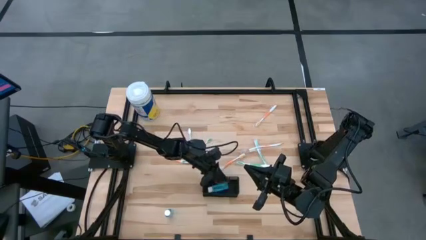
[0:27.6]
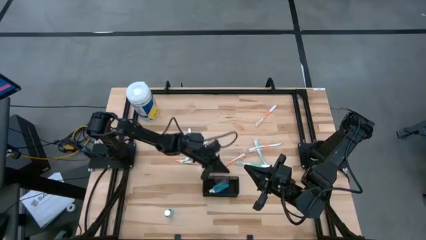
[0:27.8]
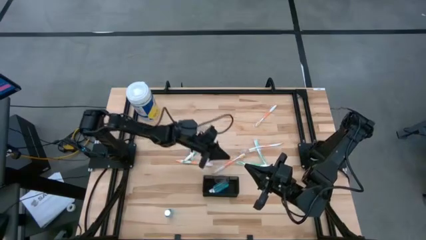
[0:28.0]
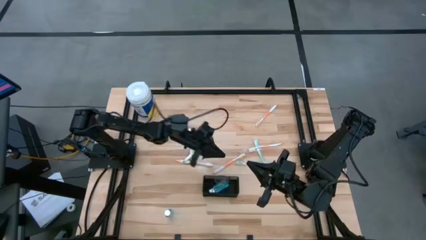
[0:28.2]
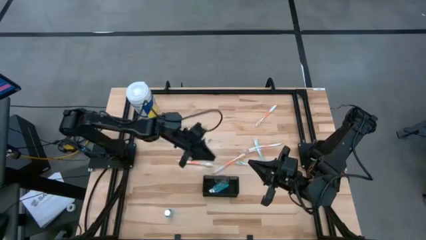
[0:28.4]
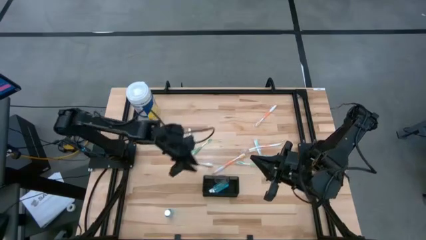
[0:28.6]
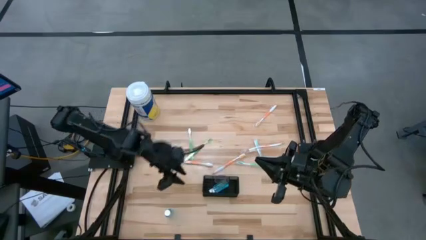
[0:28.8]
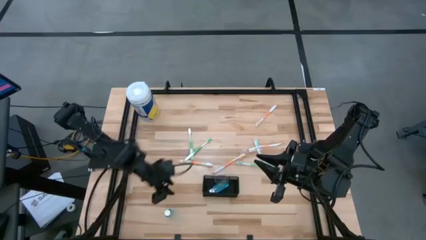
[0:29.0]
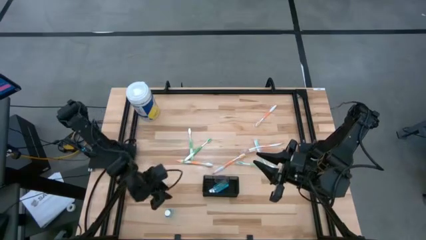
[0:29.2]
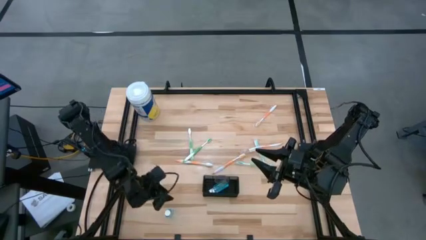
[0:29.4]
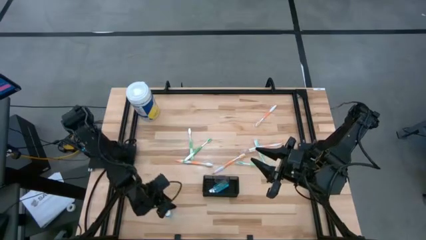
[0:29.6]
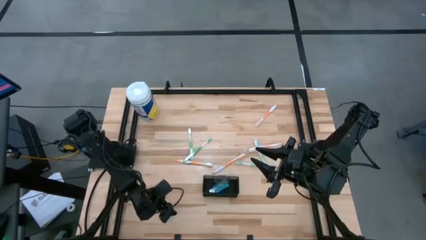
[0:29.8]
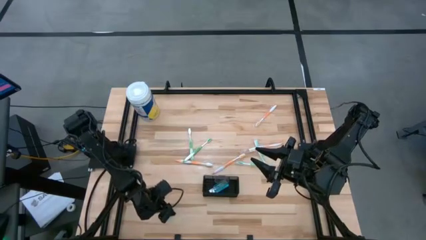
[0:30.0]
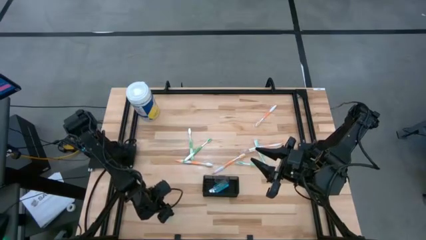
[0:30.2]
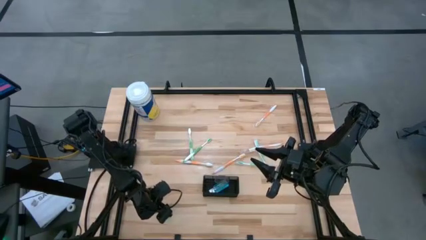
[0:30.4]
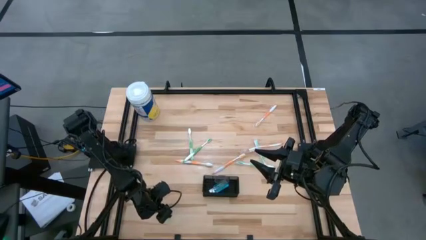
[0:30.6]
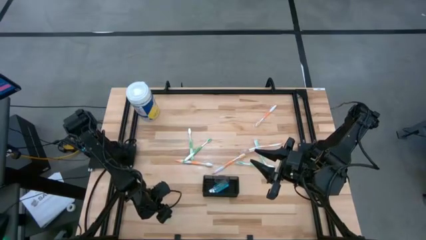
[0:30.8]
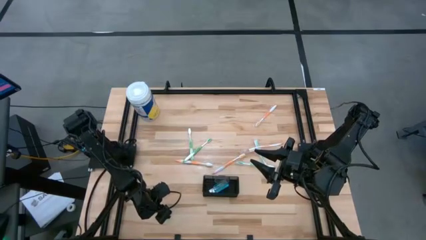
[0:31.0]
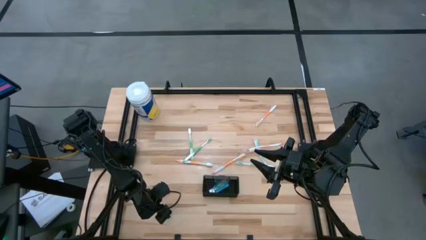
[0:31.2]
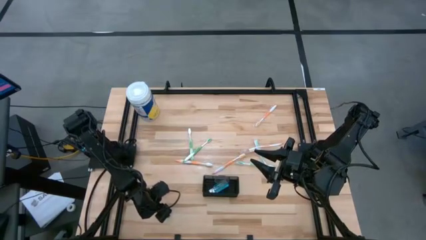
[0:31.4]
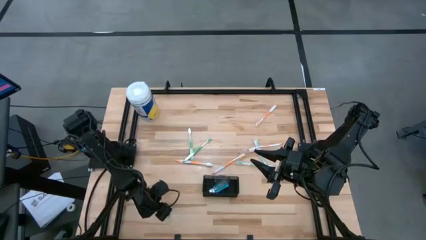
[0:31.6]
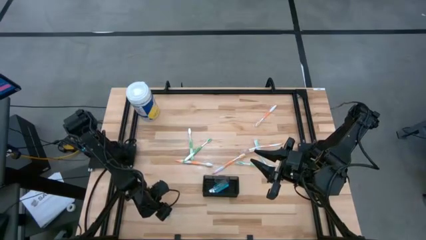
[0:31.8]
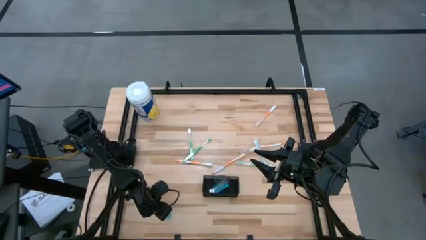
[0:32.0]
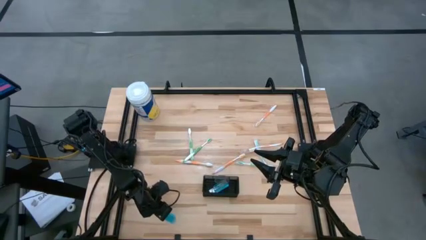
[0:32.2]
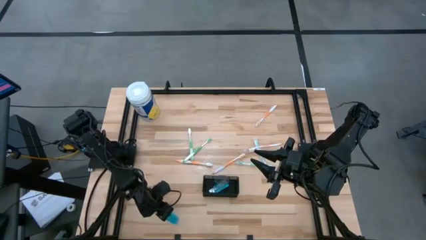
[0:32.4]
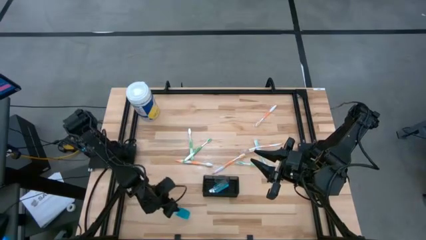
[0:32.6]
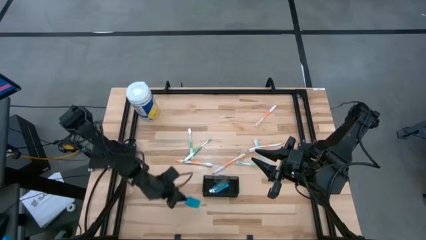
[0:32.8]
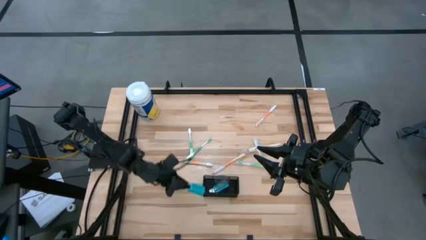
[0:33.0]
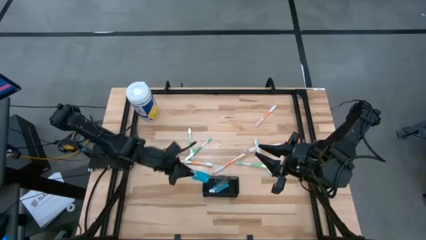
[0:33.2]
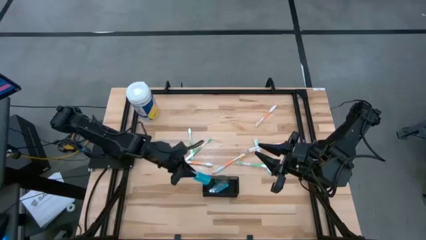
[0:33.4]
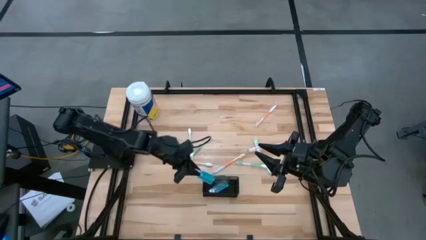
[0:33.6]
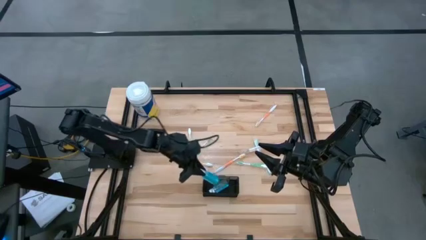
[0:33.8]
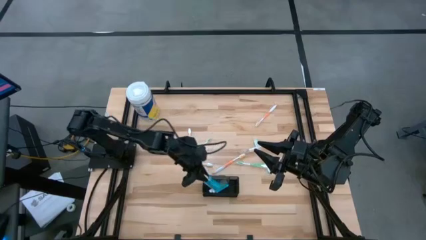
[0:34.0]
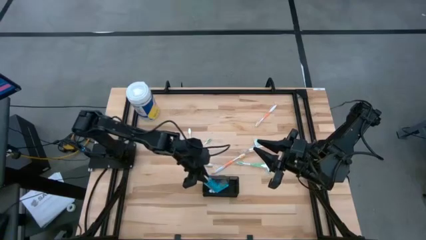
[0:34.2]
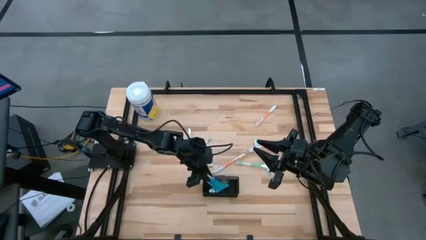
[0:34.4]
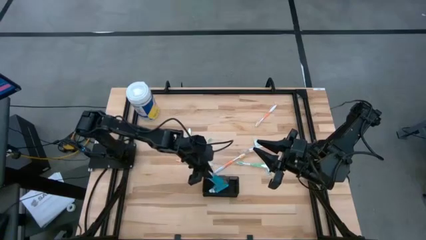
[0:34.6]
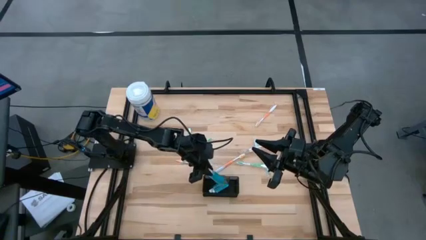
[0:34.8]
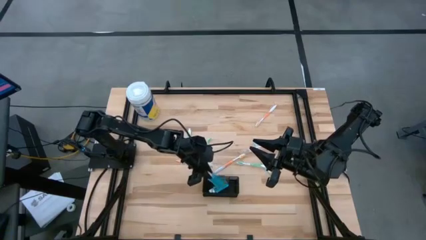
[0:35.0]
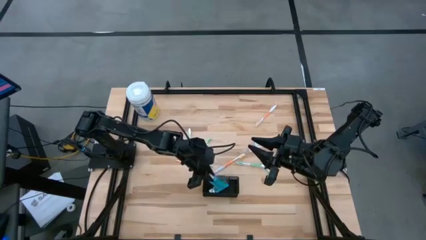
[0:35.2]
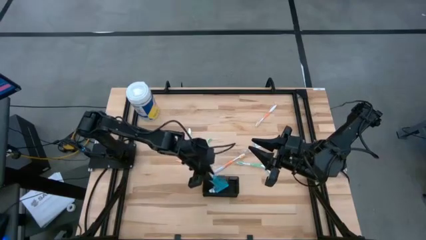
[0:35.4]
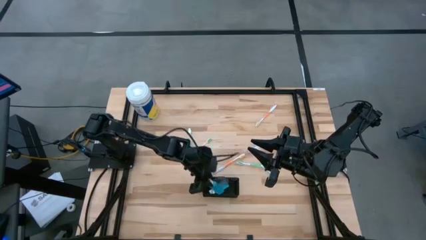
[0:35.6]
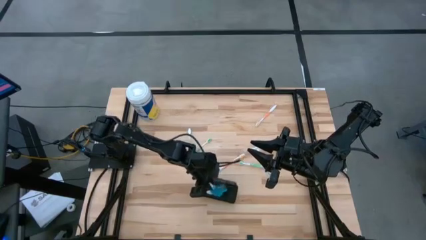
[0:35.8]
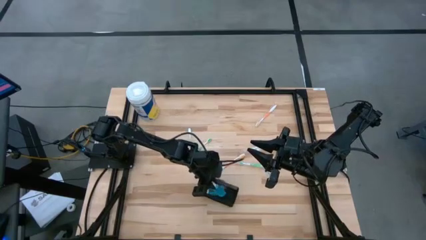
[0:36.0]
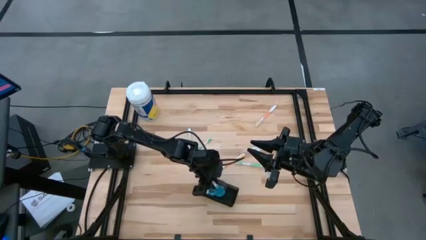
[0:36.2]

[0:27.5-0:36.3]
Task: Pick & Place toothbrushing station
Put the blue mouthwash into the black wire organizer

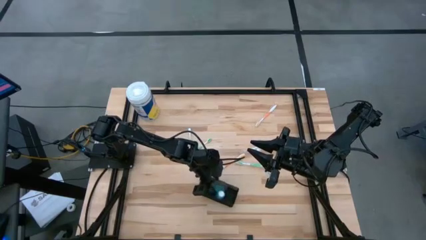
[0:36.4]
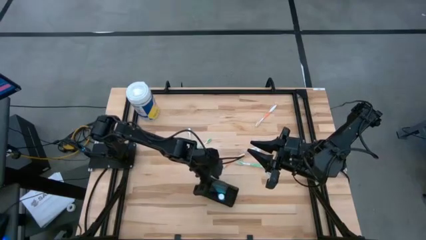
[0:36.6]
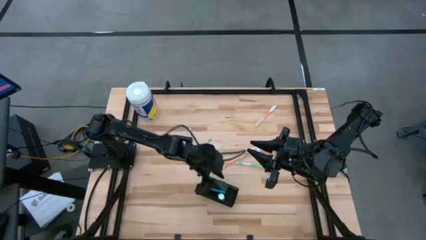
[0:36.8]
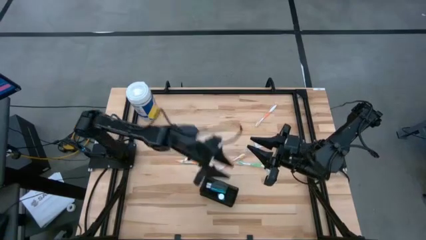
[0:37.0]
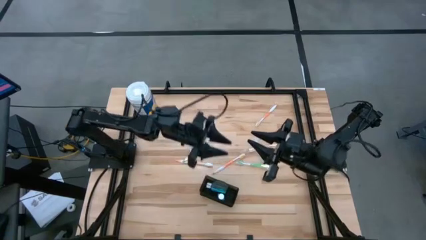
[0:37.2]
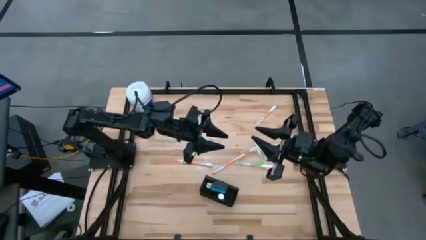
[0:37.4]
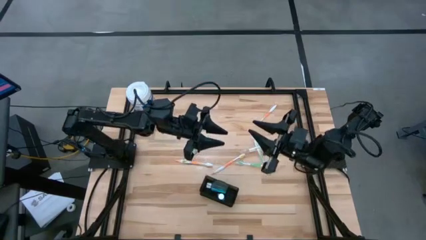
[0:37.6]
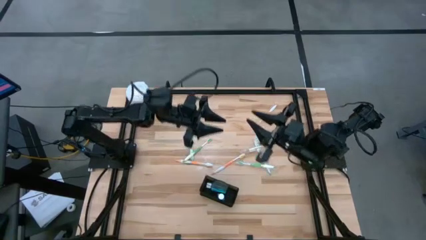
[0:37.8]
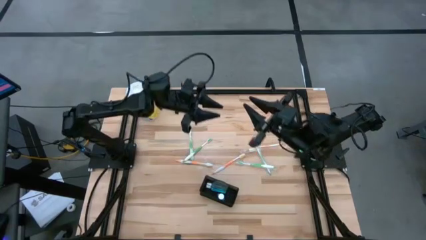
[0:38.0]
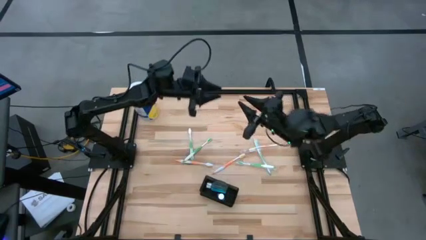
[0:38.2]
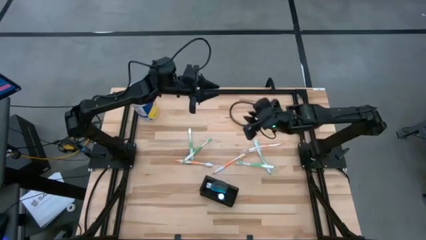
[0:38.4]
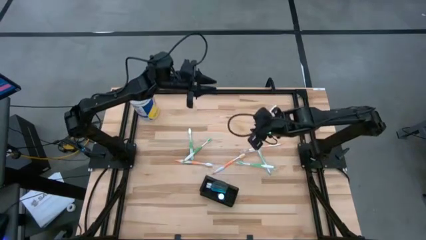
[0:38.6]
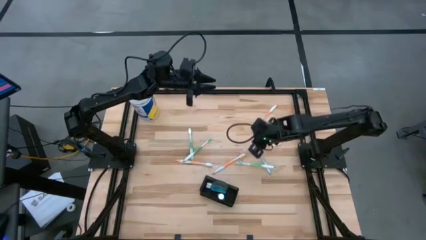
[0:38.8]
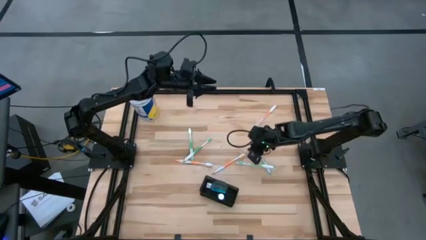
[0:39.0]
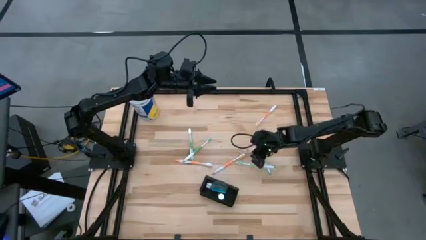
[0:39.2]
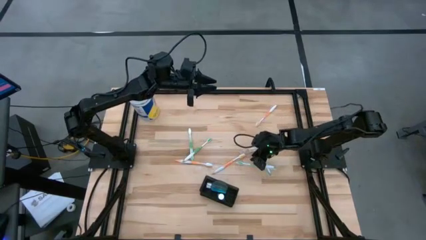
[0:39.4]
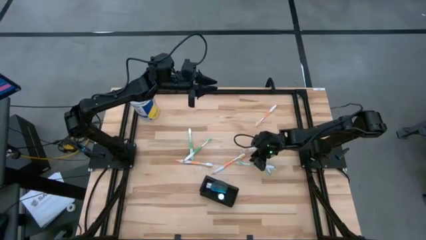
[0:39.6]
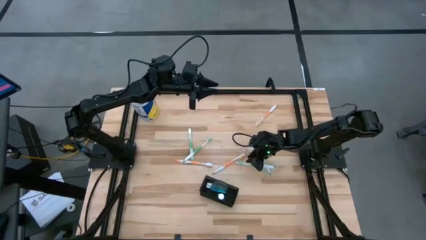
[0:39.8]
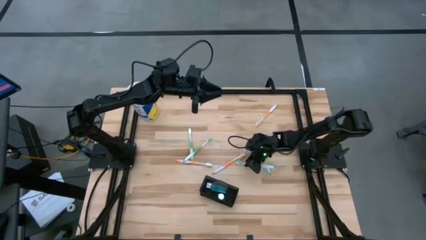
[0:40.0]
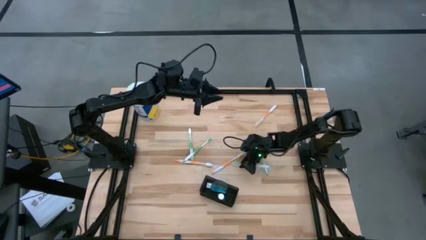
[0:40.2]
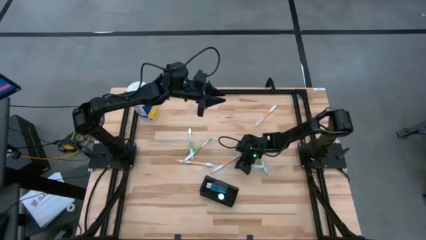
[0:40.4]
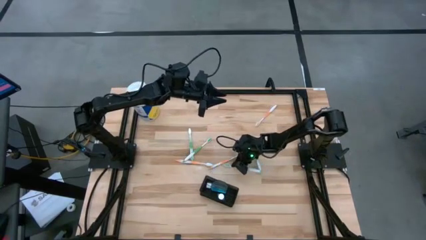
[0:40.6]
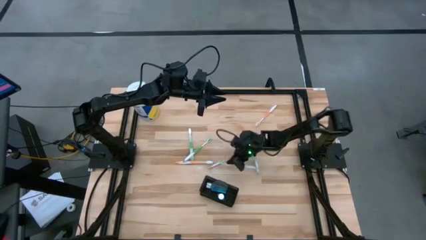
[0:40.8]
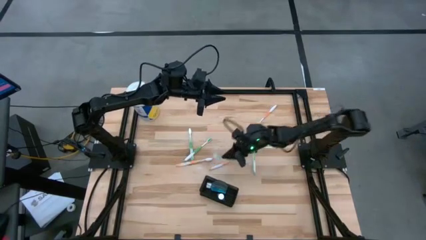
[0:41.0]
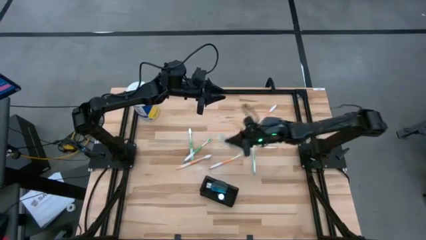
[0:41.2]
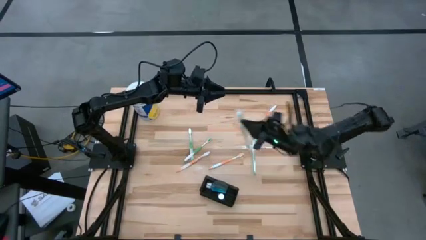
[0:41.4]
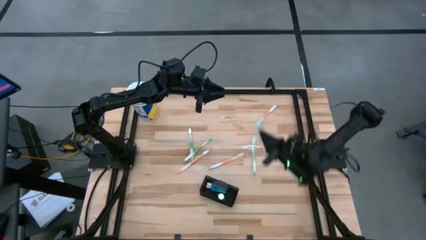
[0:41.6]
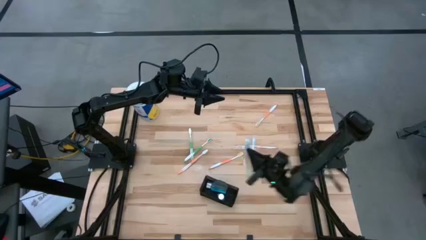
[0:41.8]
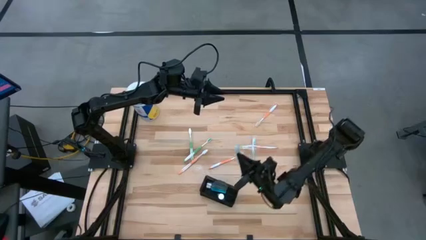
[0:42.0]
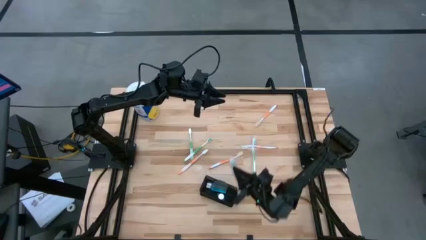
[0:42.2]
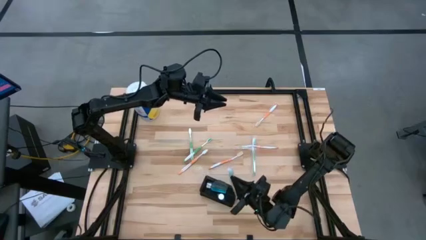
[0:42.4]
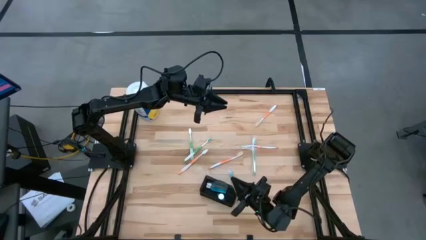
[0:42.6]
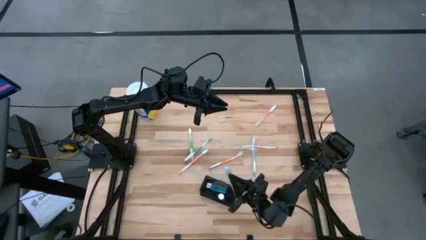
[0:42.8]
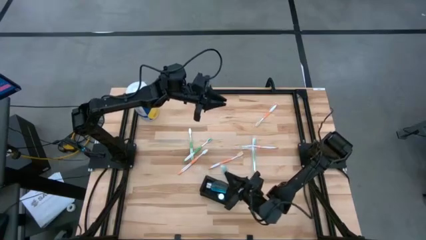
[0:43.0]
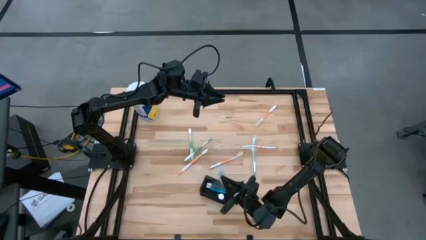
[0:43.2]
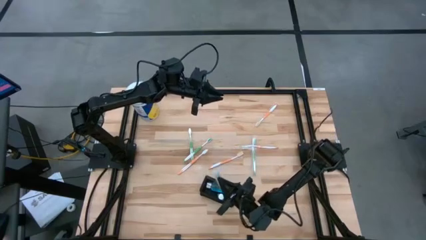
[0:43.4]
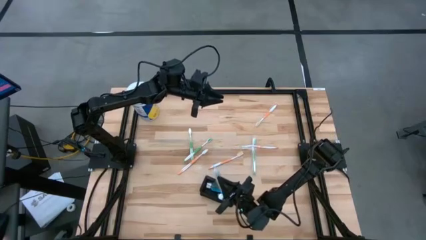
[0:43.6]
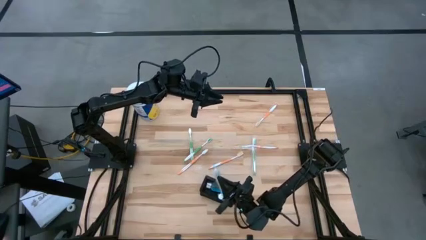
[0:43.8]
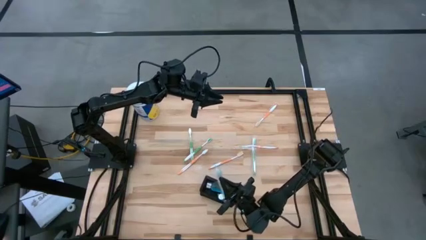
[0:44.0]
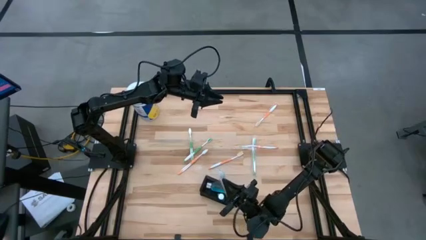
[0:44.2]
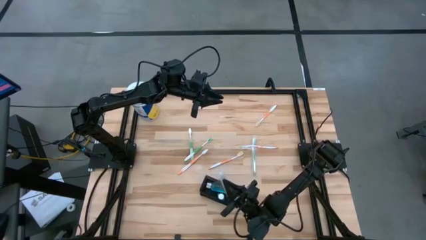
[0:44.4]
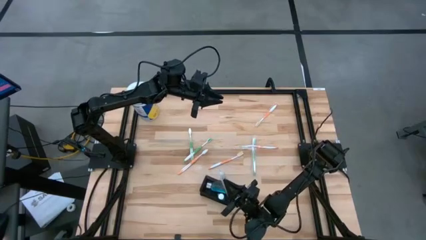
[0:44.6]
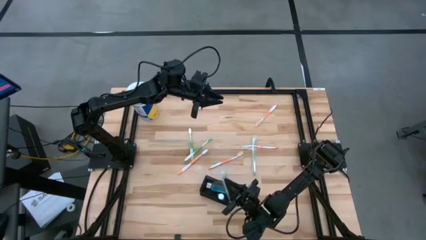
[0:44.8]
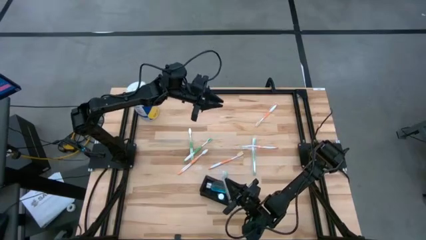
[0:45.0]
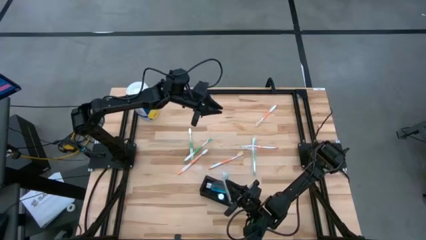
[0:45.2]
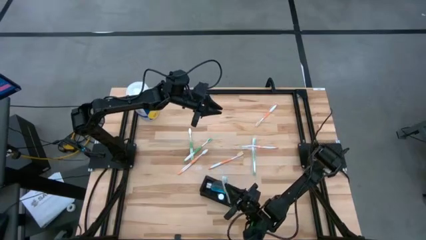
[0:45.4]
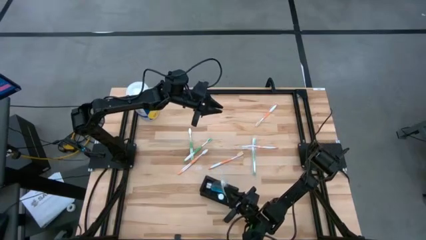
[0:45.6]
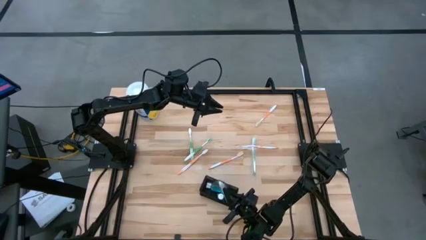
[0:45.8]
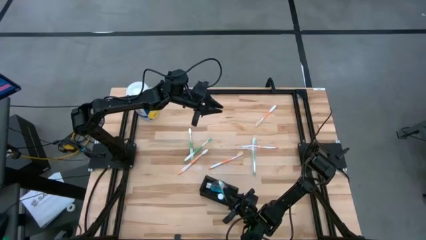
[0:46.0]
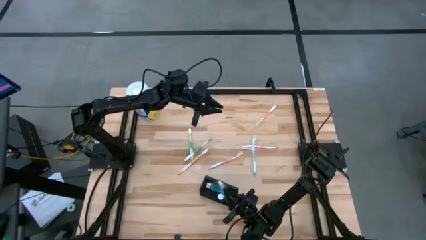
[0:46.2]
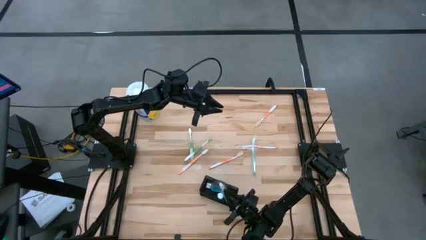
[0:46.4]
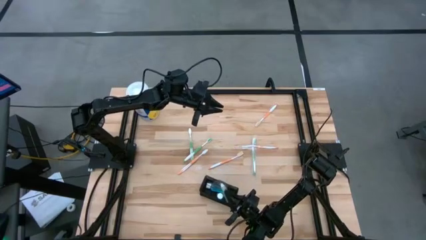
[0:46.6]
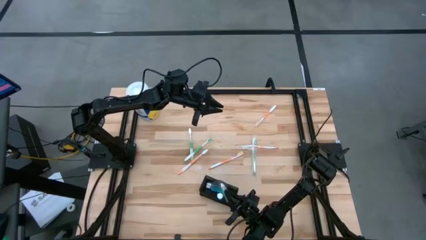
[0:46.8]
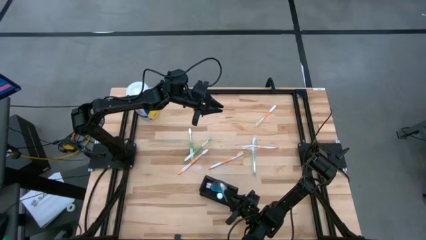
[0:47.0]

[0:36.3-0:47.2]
Put the green toothbrush into the black wire organizer
